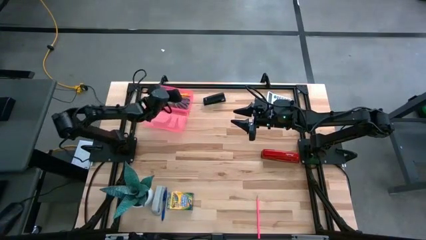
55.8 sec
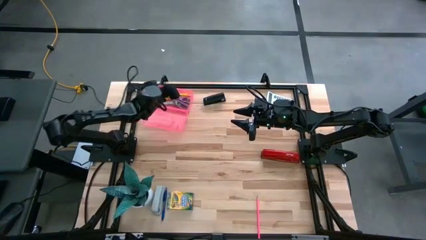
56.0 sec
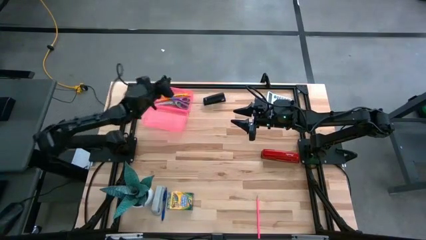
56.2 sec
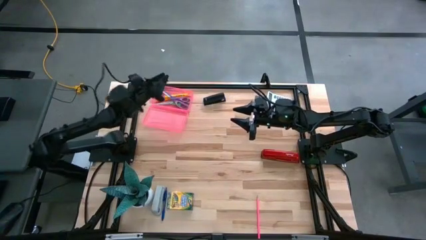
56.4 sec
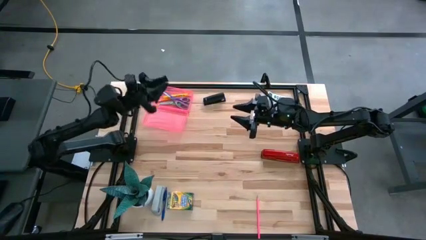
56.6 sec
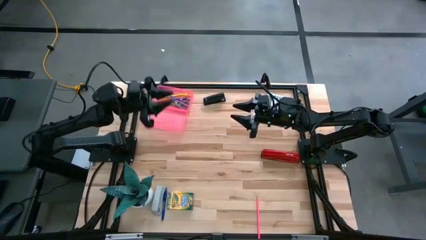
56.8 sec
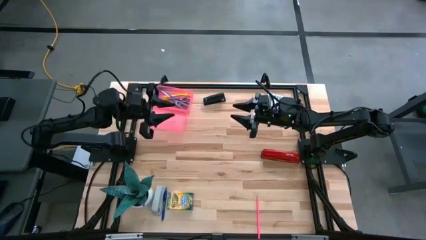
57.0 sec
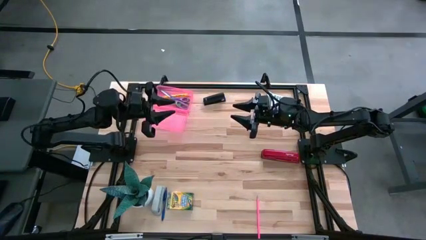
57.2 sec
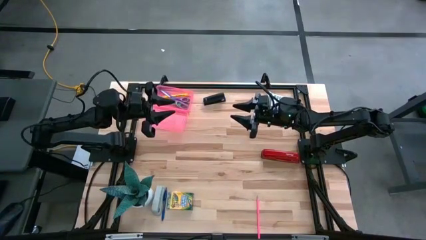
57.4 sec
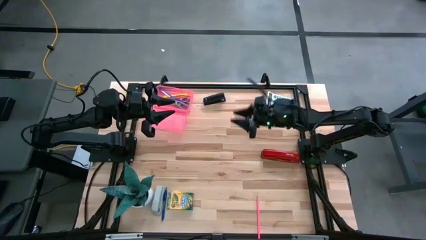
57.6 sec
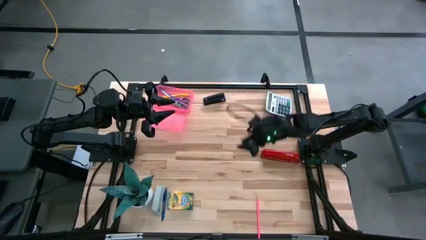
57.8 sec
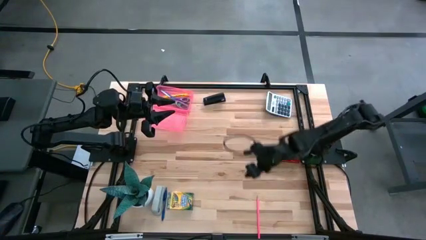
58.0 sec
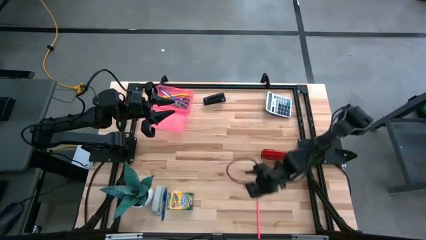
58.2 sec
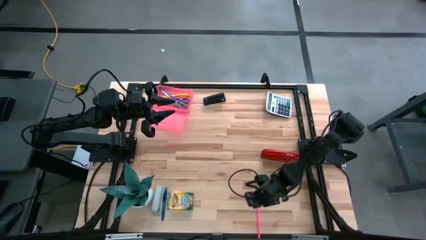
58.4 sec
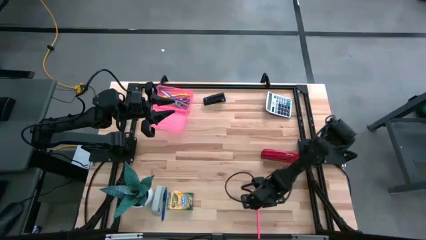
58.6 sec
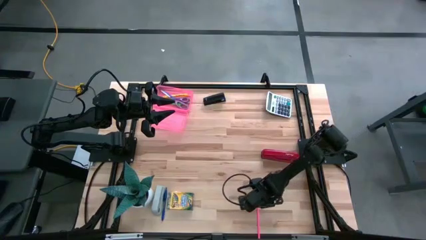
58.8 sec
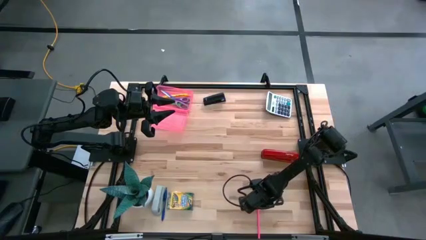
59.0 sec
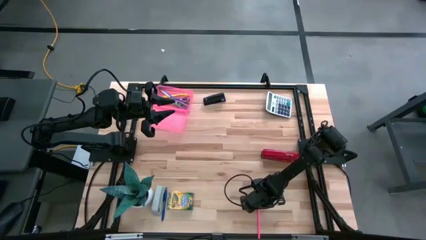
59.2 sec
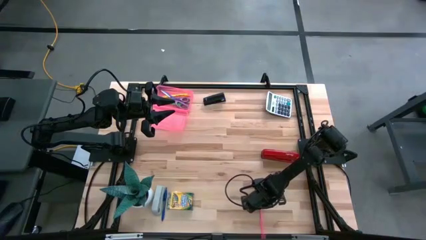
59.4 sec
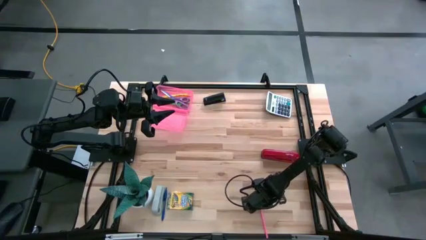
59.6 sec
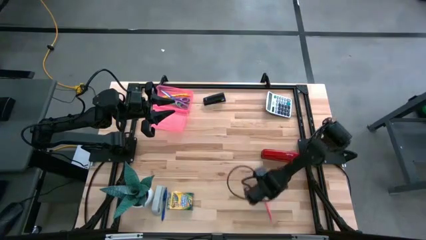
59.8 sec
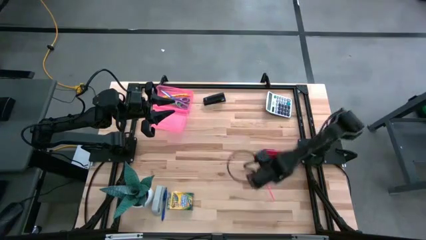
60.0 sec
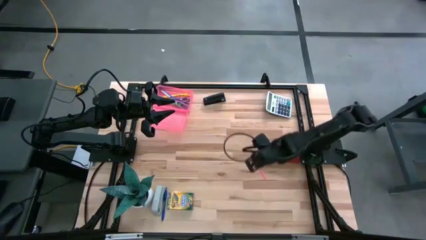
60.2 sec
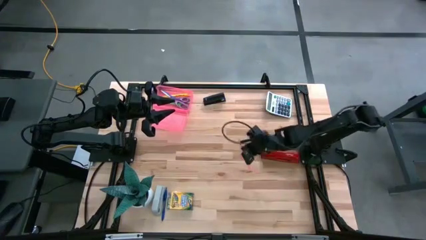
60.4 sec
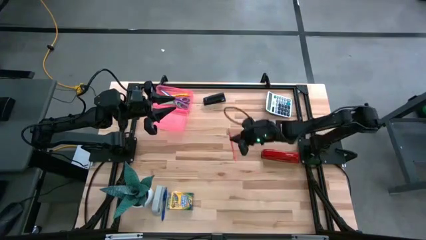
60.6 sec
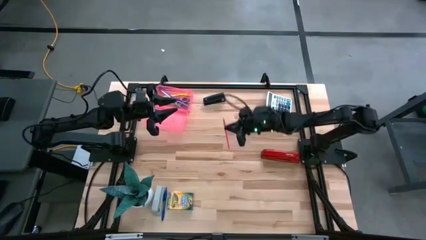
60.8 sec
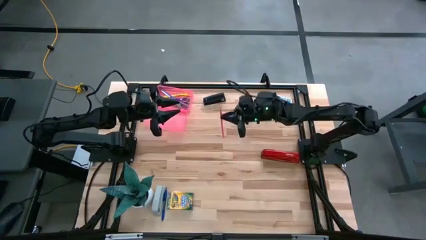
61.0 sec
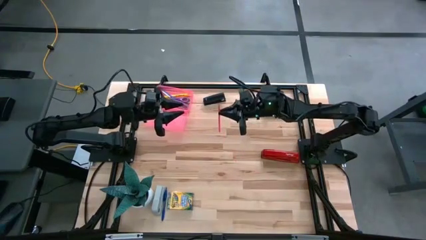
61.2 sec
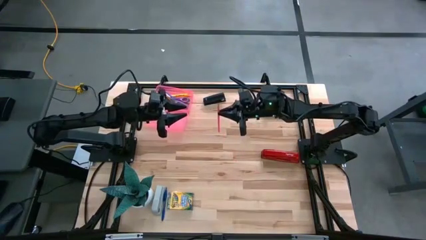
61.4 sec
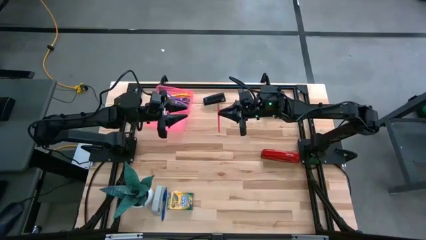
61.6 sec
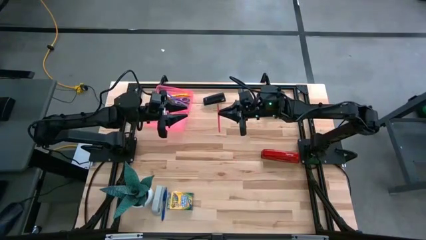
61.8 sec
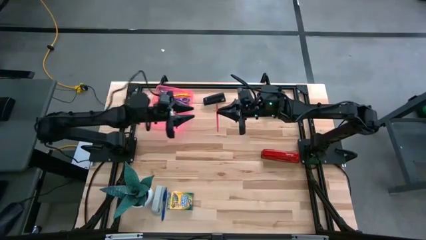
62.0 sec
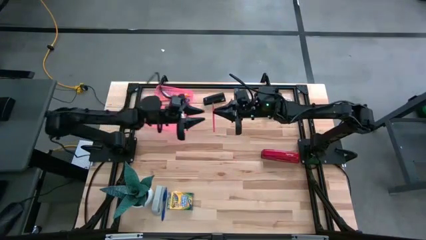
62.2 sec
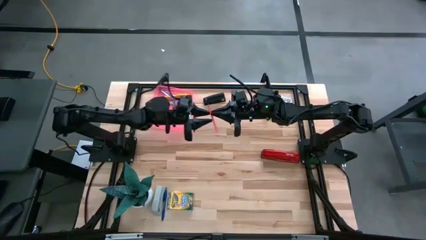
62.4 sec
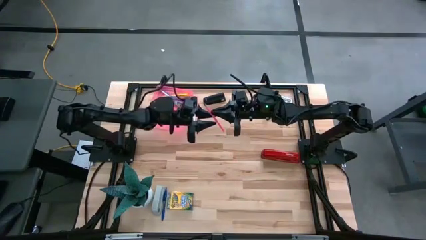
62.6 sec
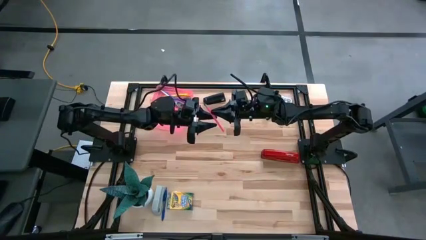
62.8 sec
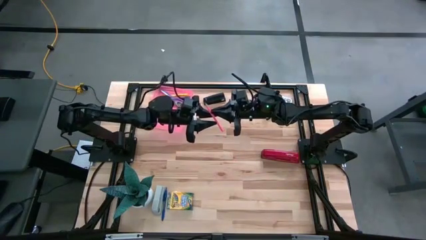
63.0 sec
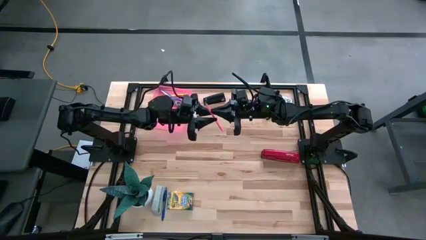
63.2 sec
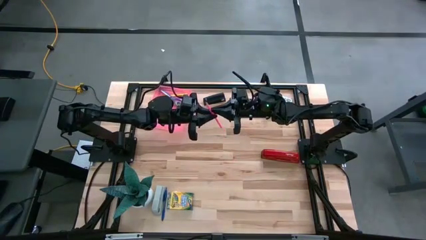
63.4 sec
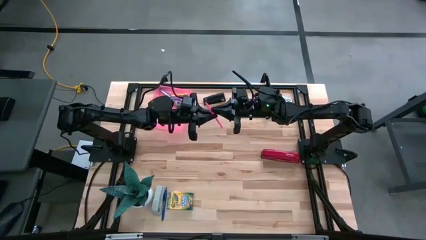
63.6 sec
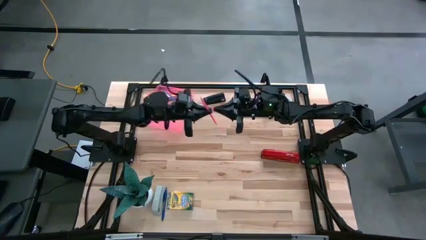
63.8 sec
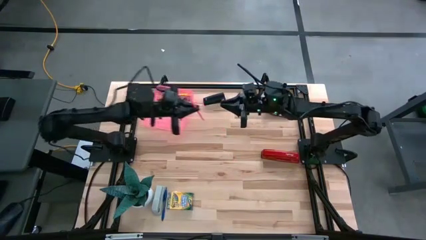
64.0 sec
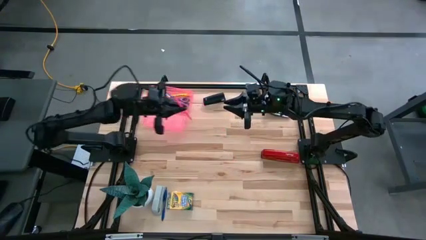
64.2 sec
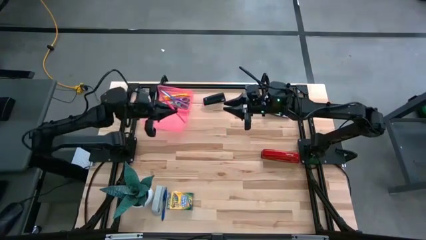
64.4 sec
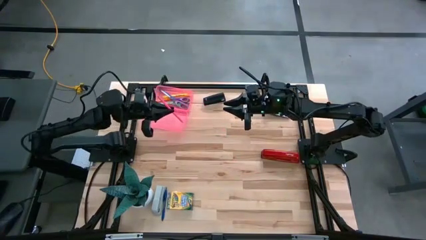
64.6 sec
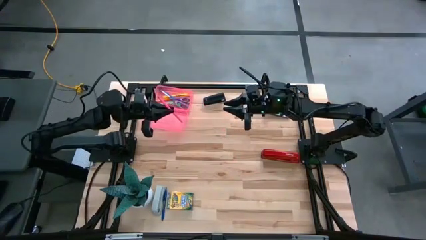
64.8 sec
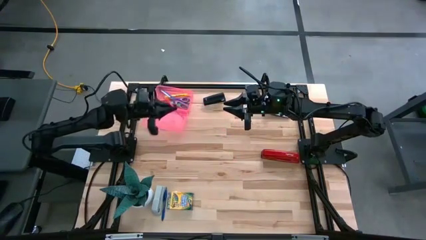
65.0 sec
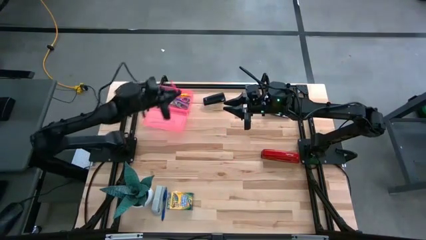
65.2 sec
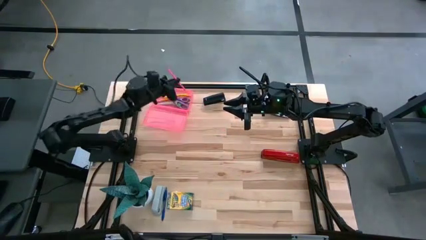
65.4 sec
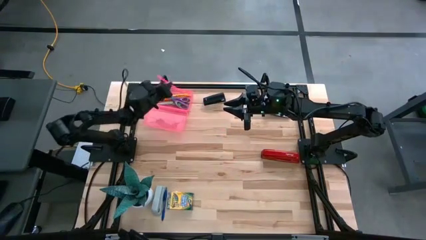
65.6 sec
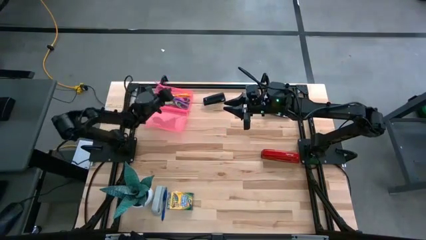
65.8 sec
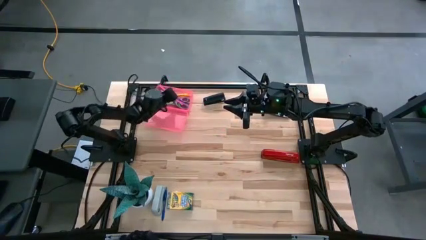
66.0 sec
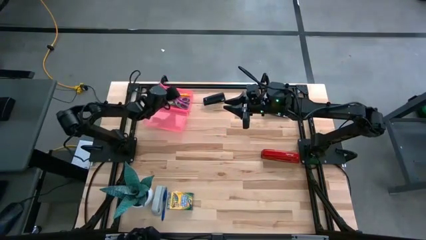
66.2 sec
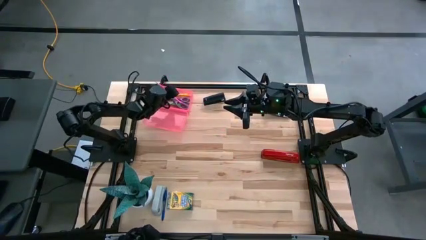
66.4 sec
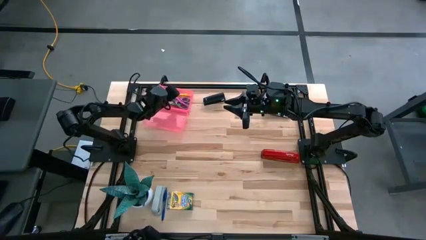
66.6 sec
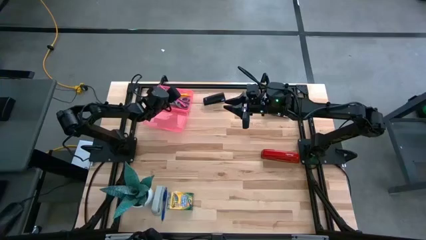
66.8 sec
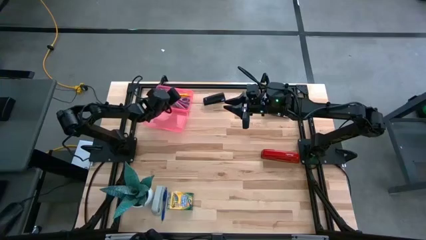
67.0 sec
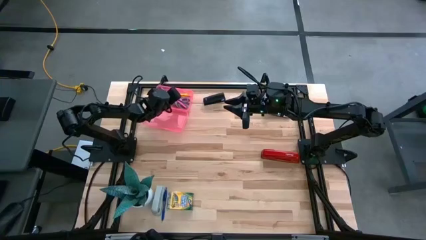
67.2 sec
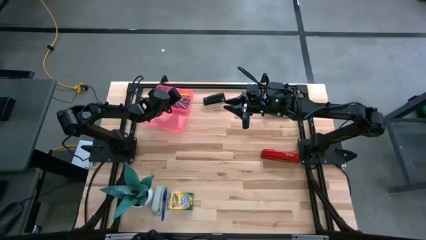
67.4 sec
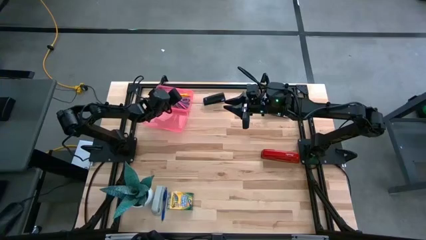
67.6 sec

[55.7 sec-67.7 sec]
Task: Pack school essentials
Put the pink pencil into the pink supply box
